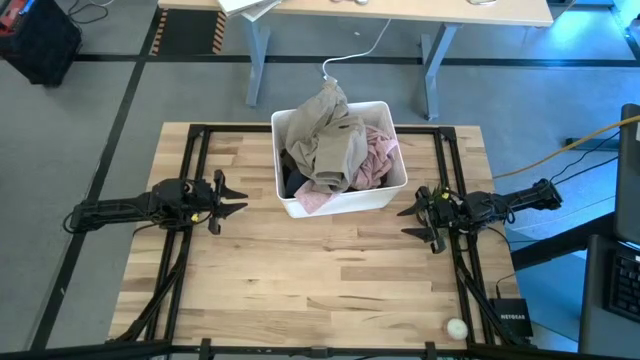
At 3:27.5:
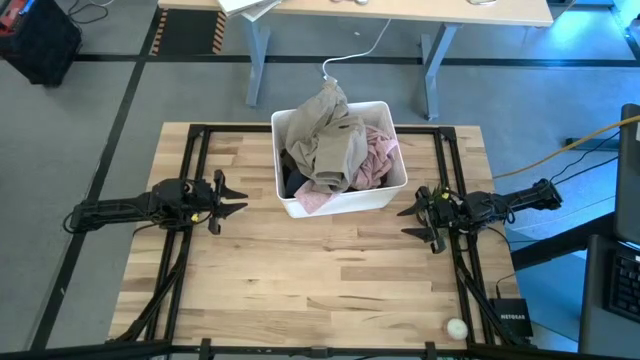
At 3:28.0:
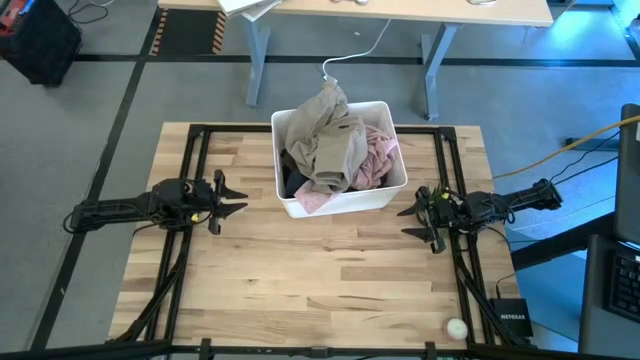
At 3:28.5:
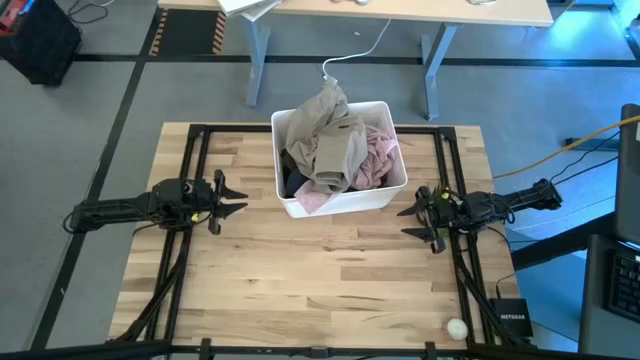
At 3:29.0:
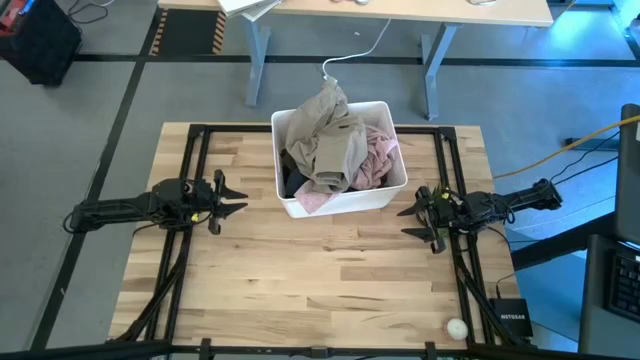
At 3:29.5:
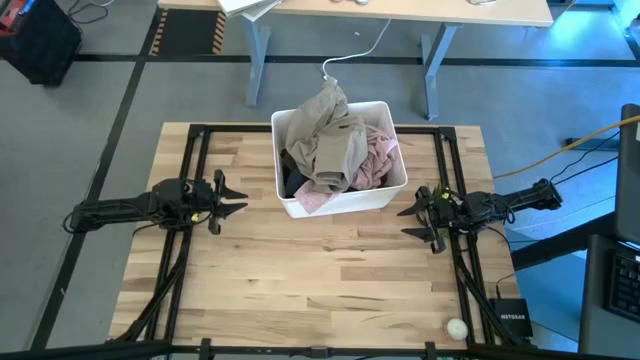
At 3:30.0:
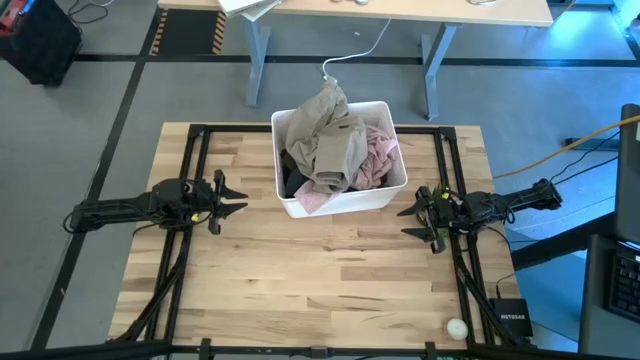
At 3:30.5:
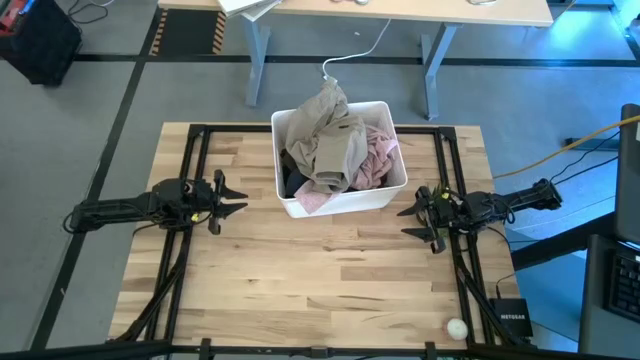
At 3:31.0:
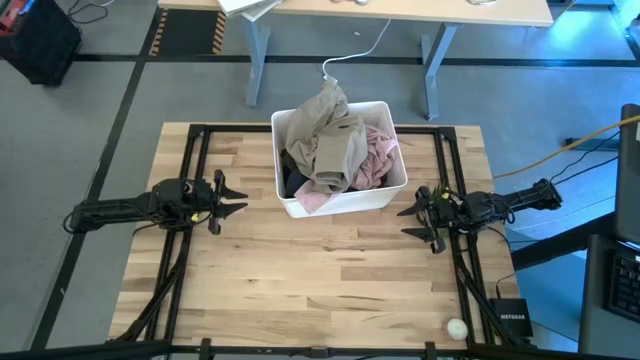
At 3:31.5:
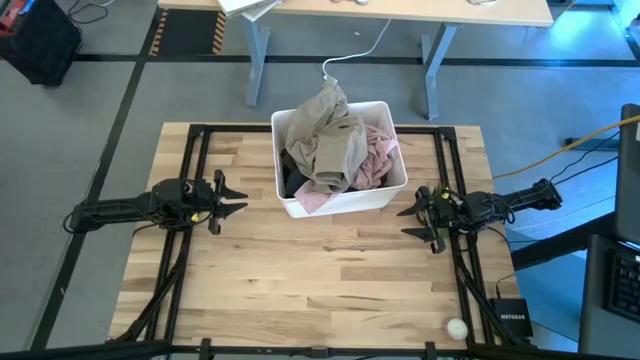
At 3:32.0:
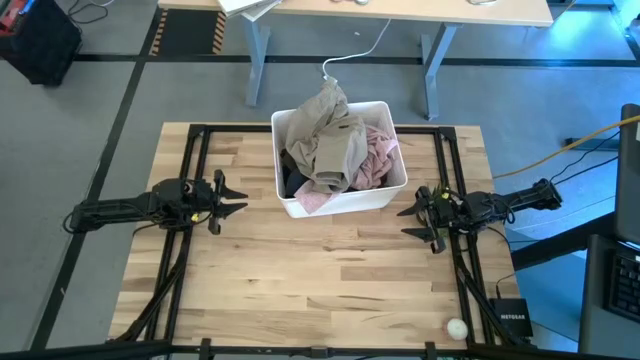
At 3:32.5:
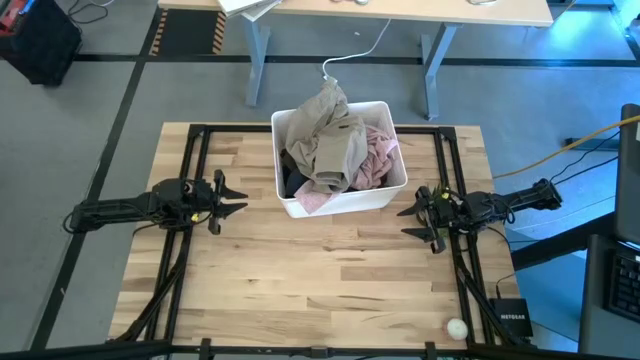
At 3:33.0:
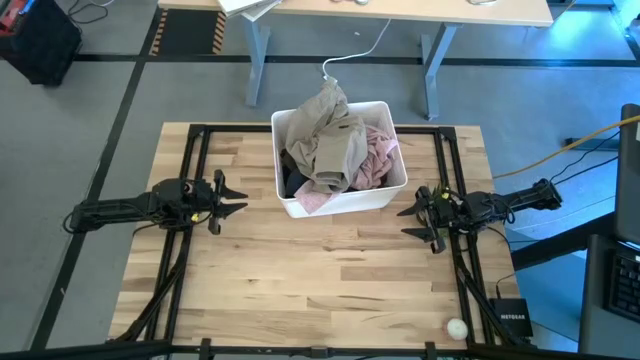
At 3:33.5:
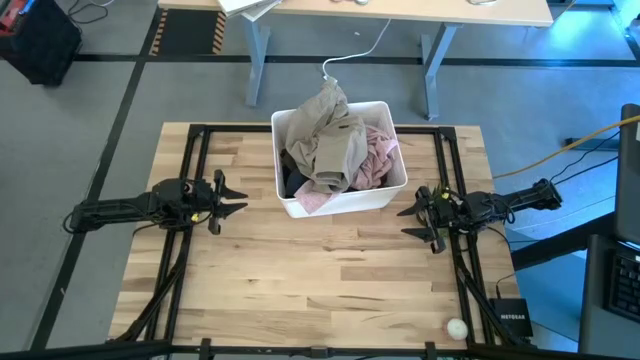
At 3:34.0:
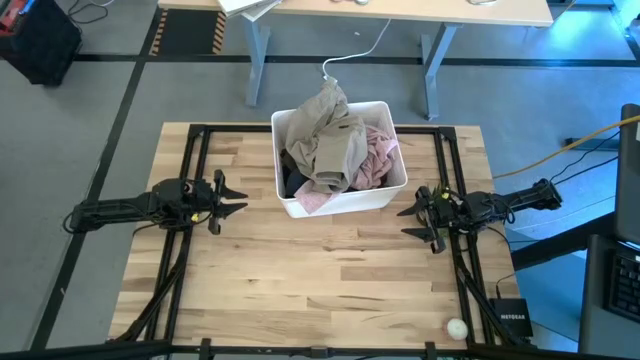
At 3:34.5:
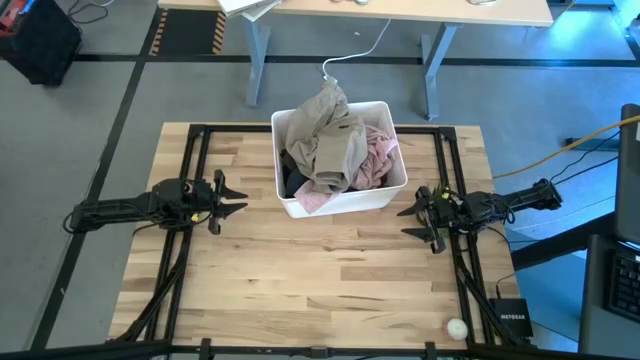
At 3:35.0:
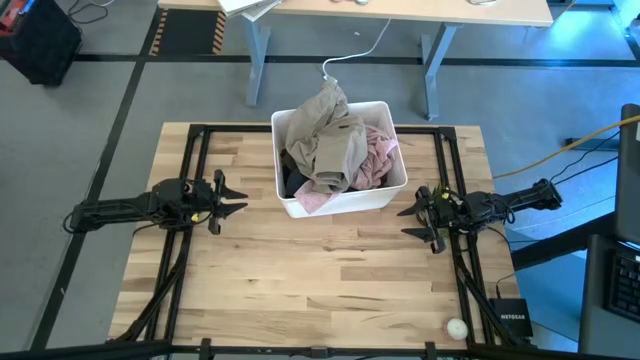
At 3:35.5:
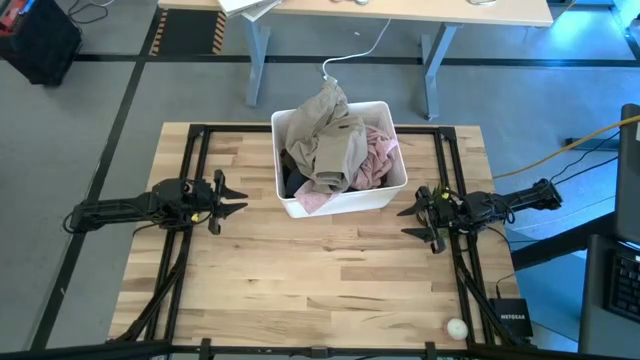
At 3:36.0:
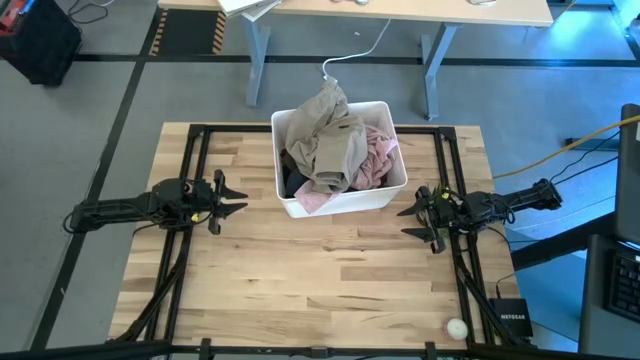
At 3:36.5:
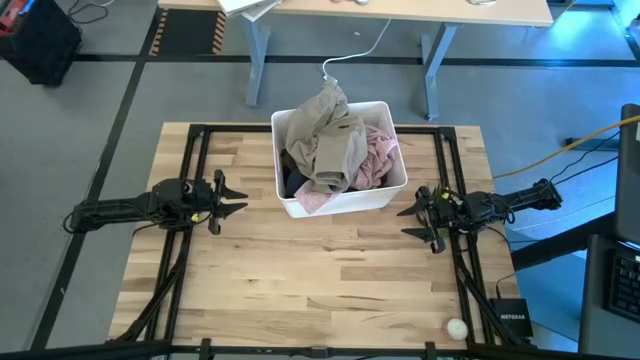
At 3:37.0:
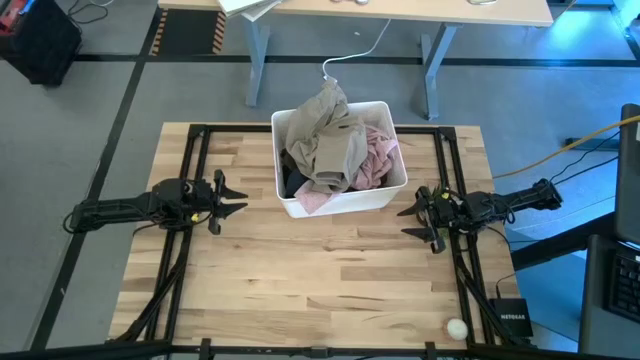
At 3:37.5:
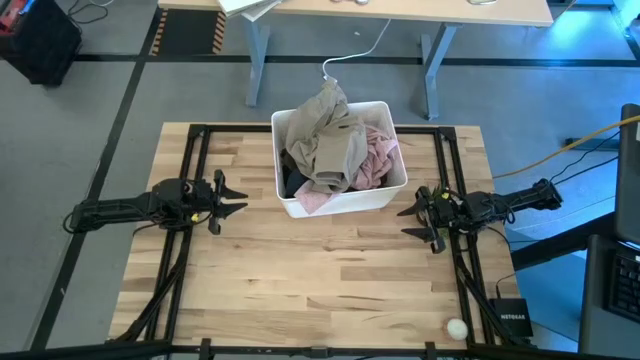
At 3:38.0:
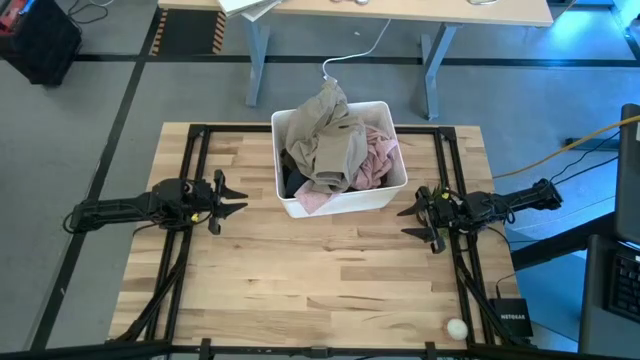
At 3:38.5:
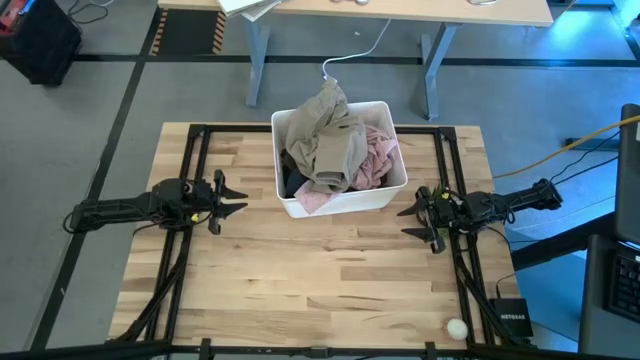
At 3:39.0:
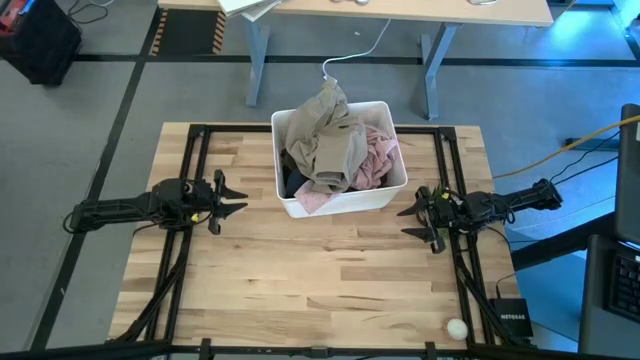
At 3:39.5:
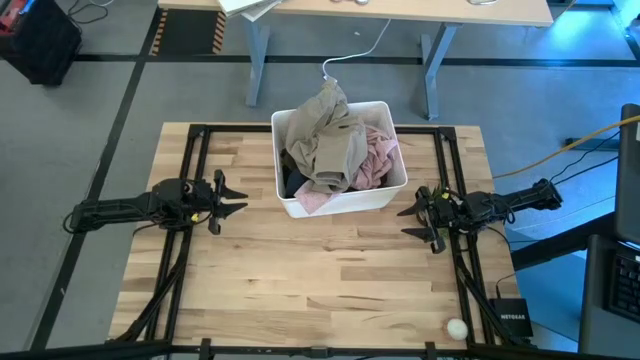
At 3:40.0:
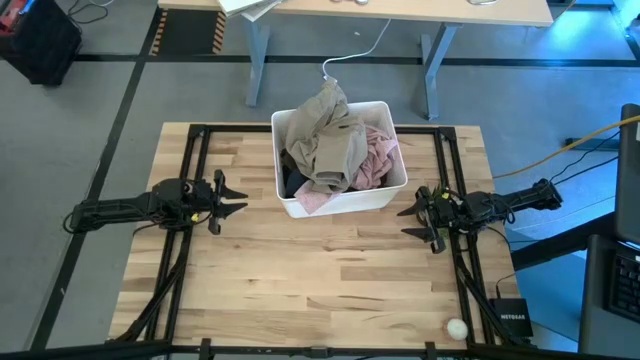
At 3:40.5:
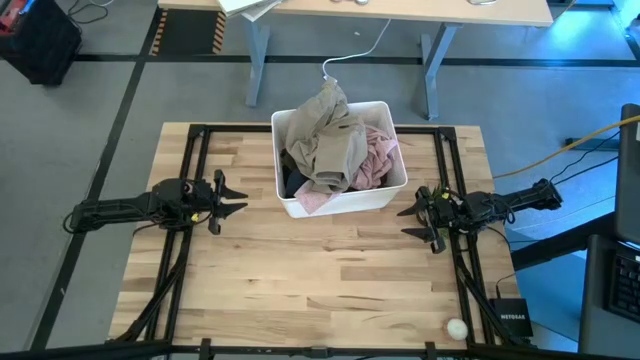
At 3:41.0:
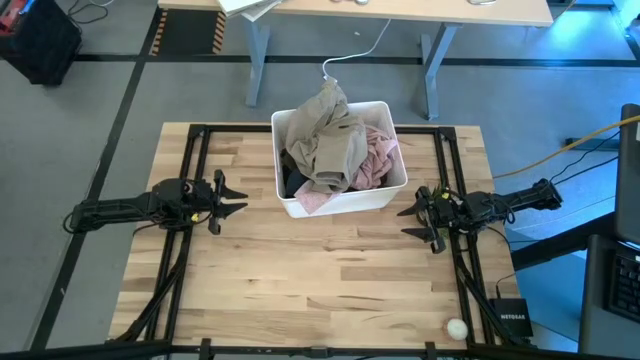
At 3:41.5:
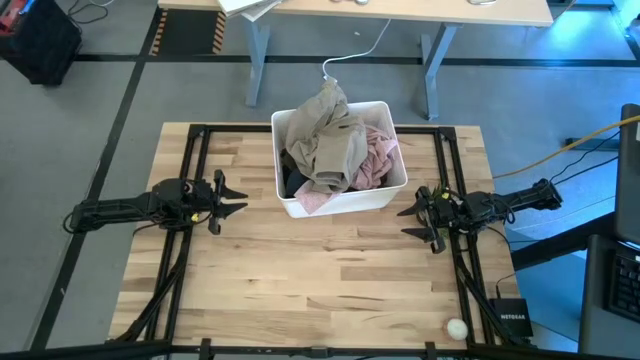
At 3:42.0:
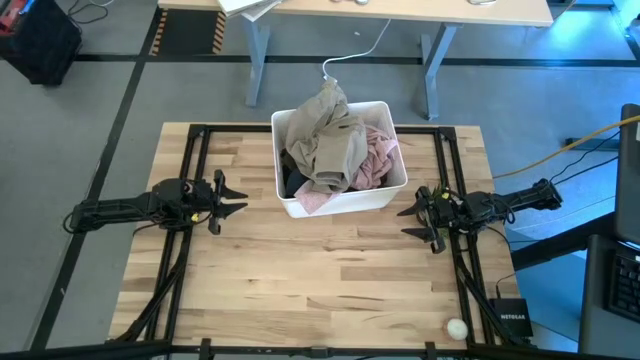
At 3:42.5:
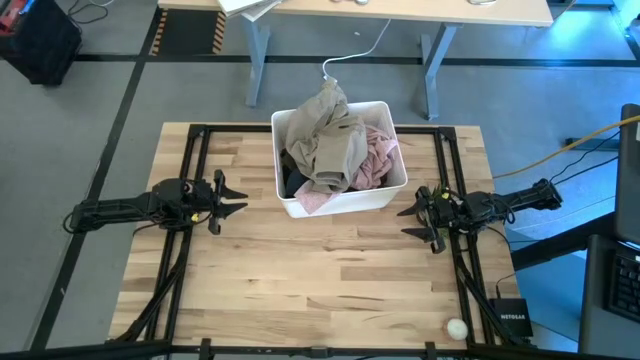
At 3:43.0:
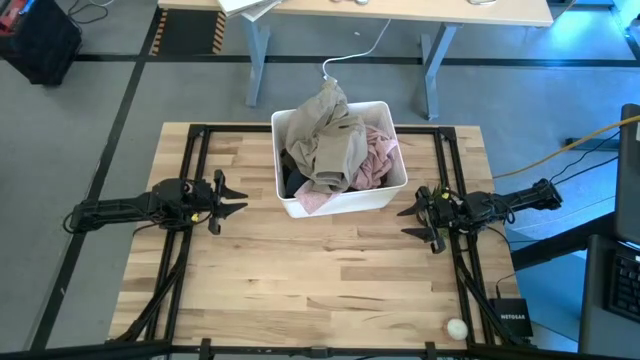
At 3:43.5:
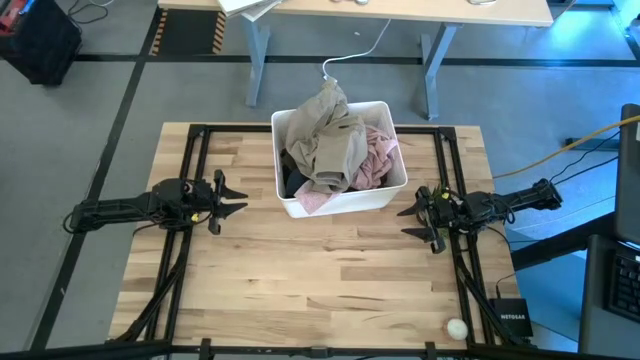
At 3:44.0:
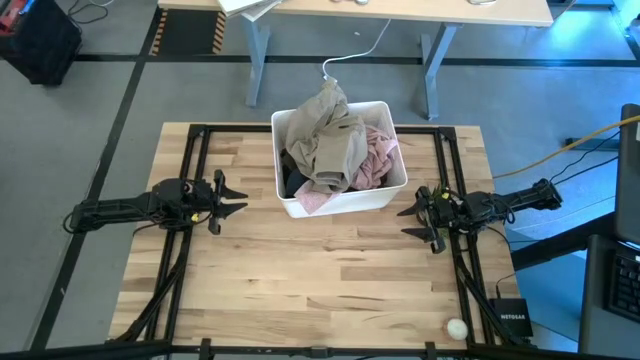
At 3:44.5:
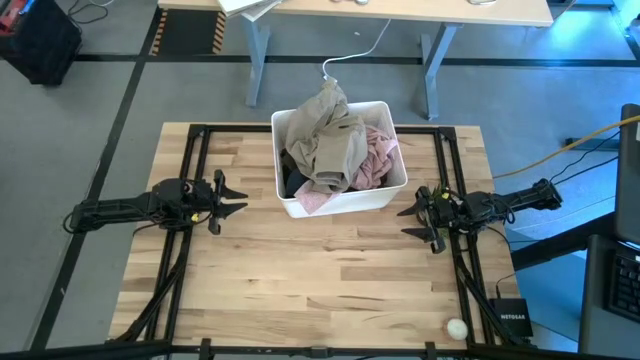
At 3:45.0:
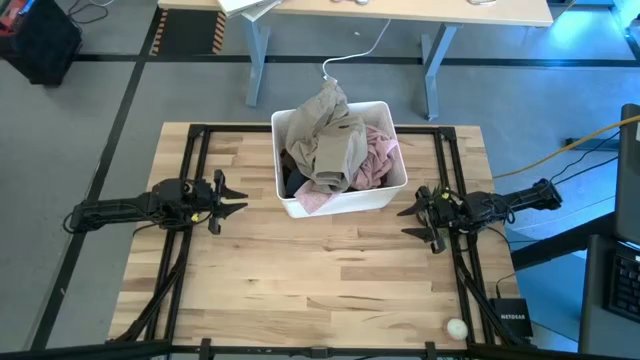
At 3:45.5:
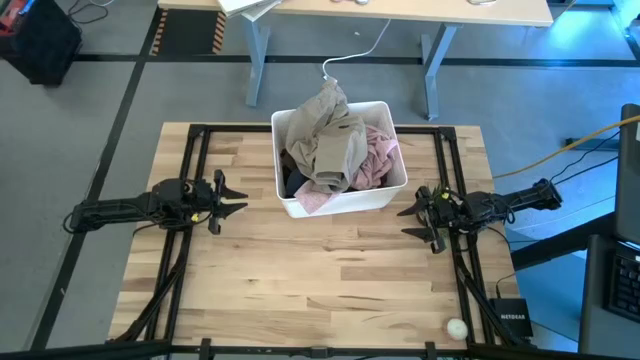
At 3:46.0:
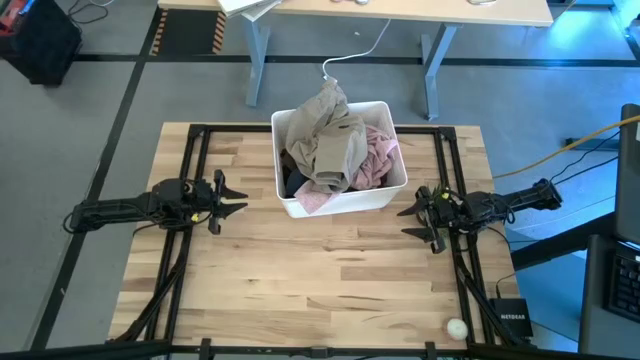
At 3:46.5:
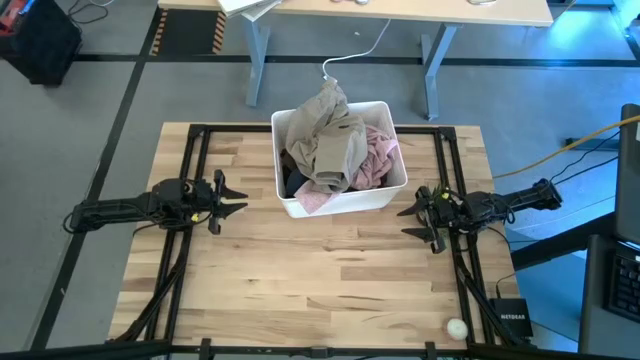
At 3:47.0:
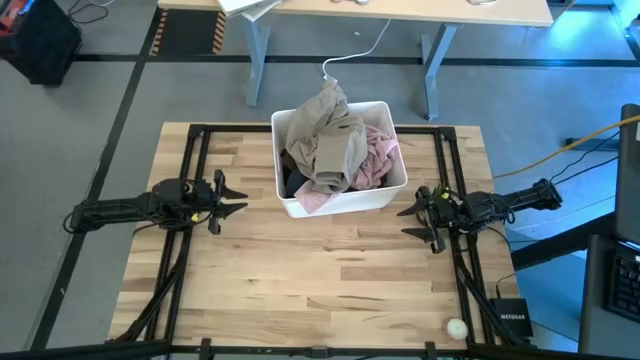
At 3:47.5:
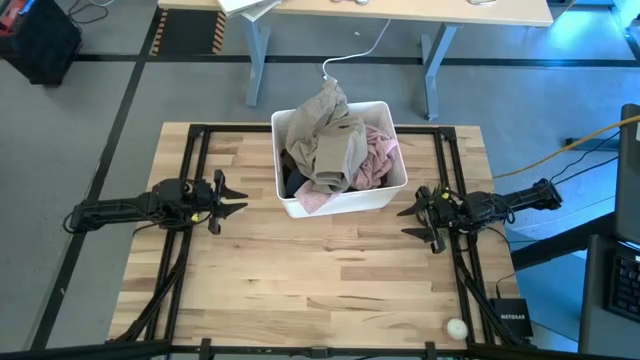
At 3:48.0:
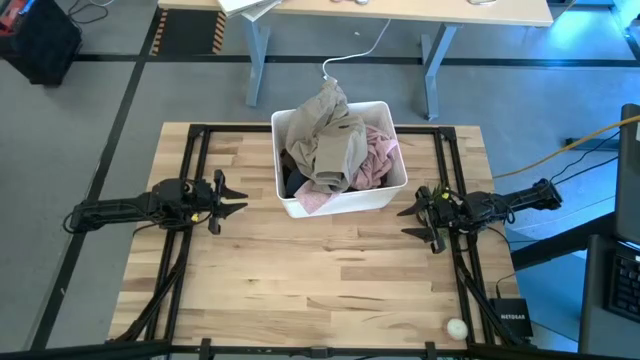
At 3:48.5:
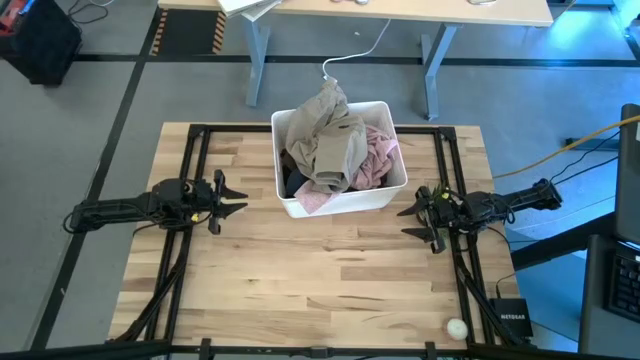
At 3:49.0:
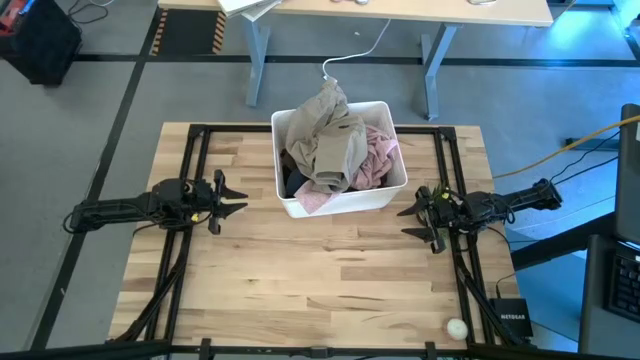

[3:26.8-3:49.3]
Task: Sort clothes
Return to Home Position
